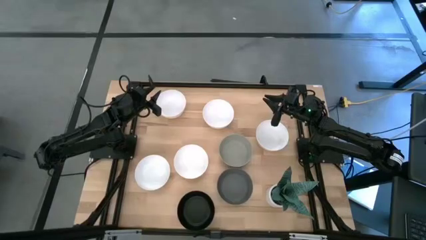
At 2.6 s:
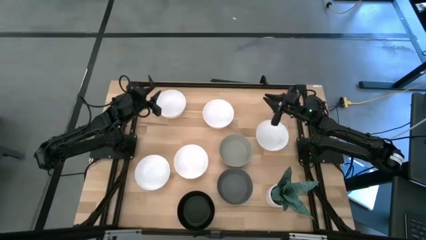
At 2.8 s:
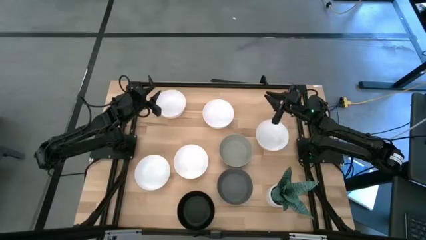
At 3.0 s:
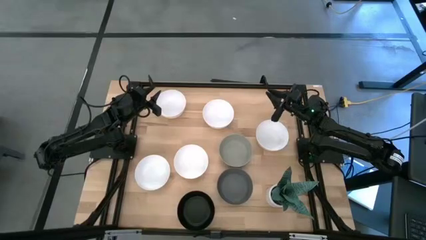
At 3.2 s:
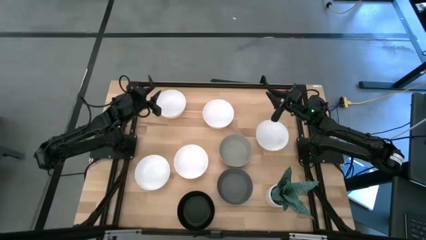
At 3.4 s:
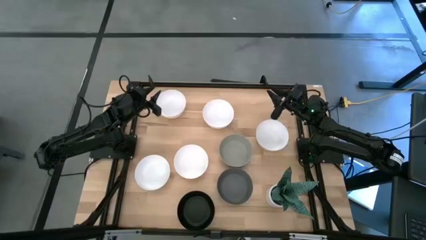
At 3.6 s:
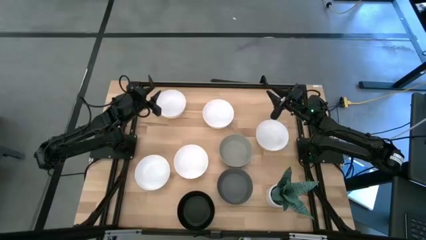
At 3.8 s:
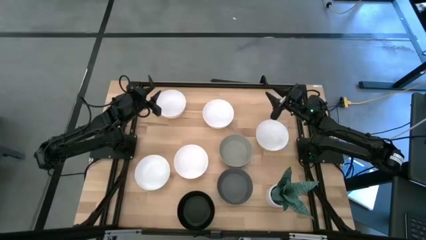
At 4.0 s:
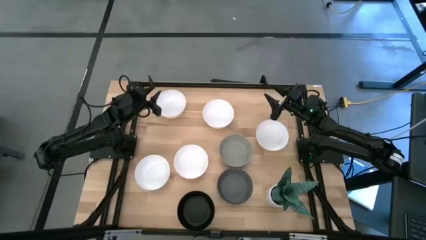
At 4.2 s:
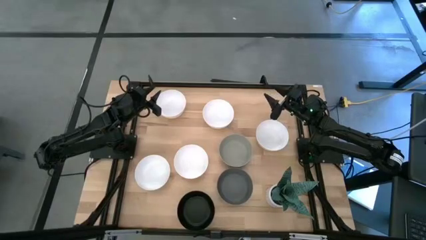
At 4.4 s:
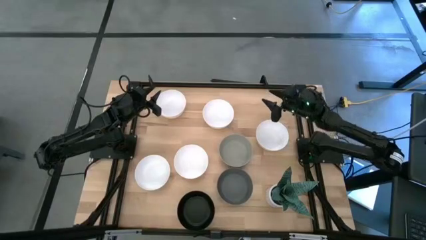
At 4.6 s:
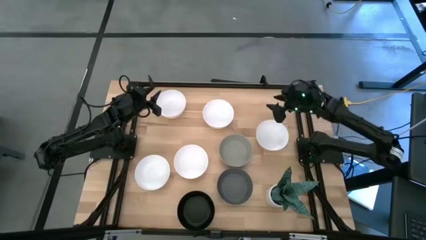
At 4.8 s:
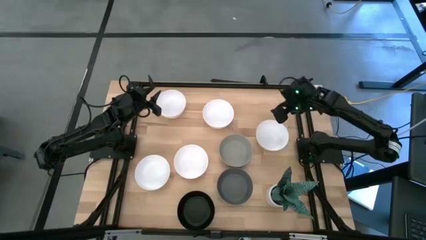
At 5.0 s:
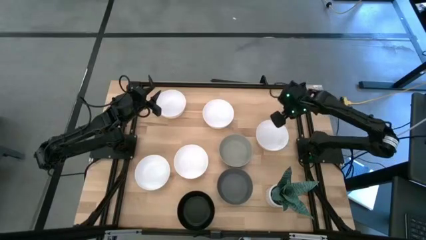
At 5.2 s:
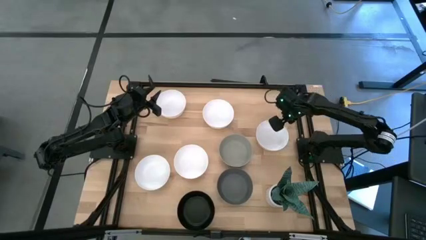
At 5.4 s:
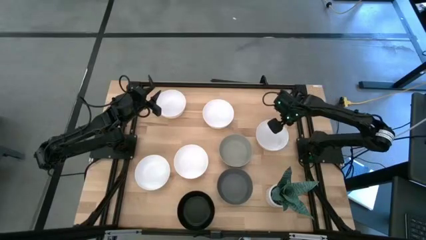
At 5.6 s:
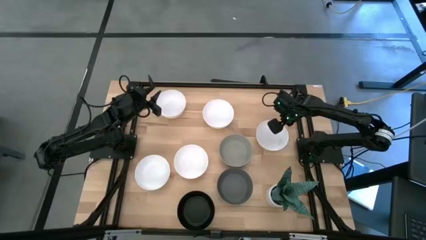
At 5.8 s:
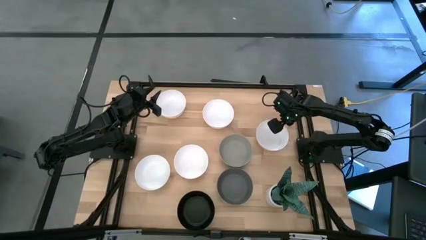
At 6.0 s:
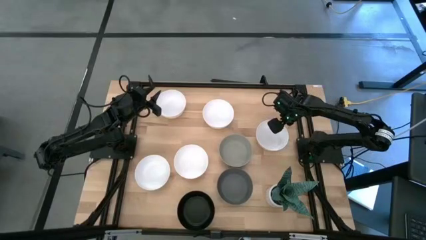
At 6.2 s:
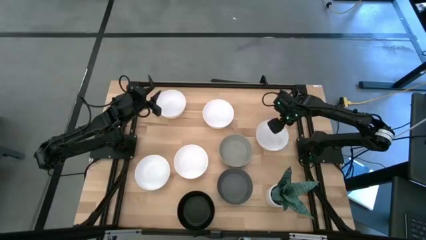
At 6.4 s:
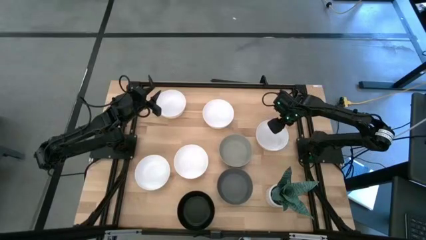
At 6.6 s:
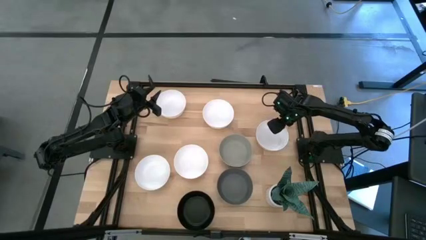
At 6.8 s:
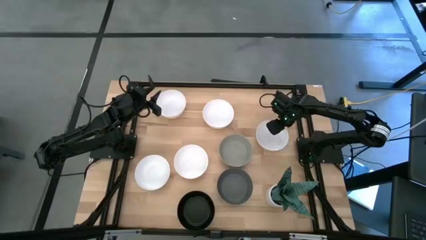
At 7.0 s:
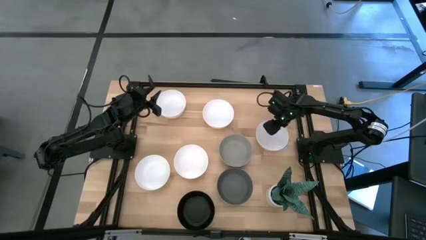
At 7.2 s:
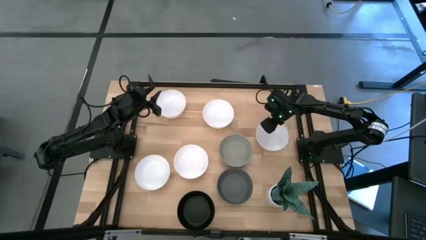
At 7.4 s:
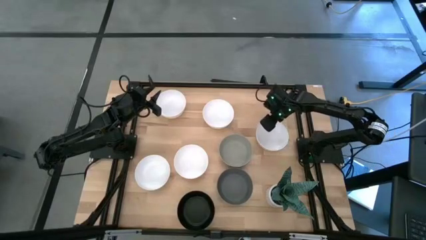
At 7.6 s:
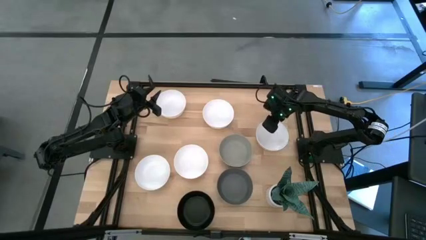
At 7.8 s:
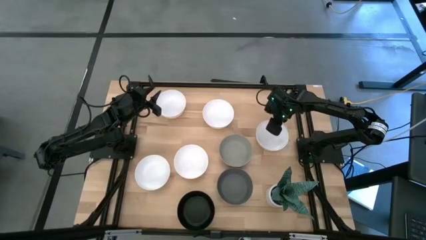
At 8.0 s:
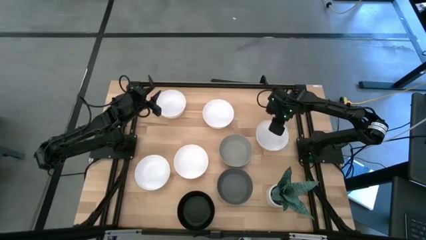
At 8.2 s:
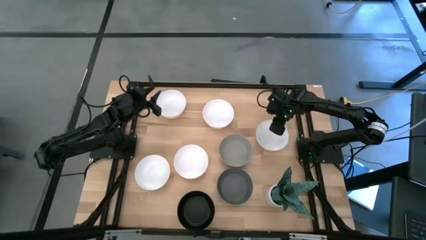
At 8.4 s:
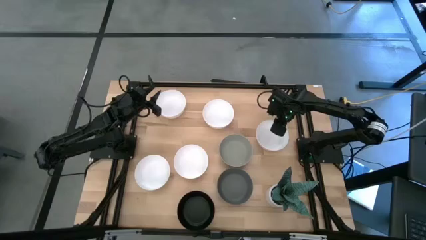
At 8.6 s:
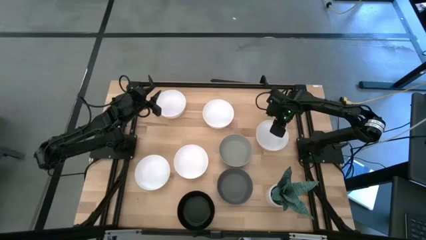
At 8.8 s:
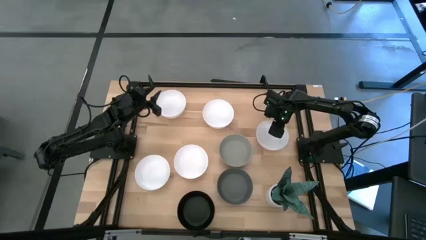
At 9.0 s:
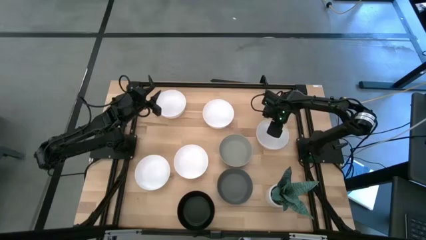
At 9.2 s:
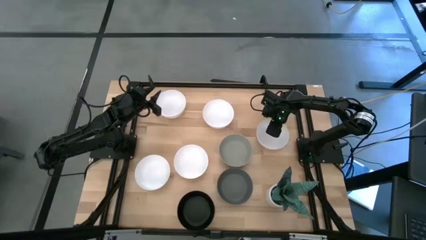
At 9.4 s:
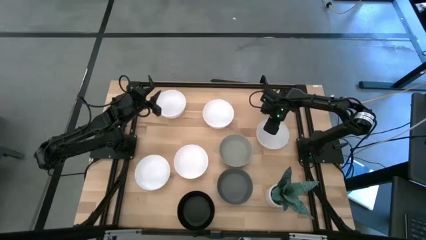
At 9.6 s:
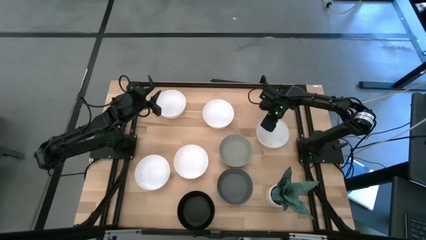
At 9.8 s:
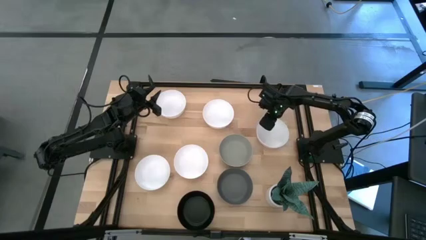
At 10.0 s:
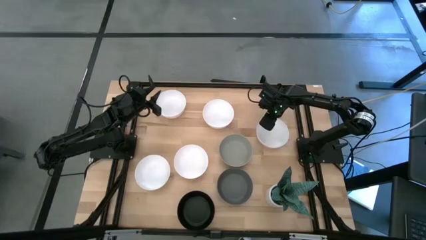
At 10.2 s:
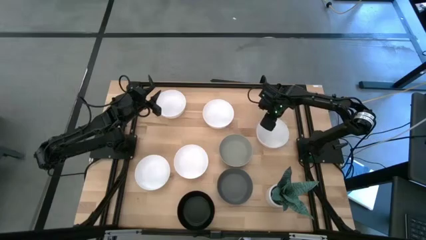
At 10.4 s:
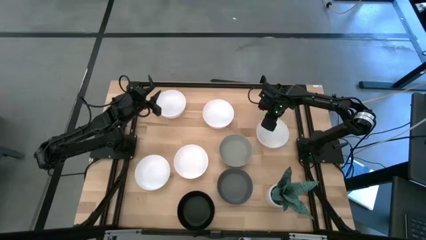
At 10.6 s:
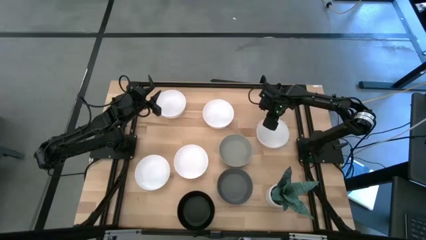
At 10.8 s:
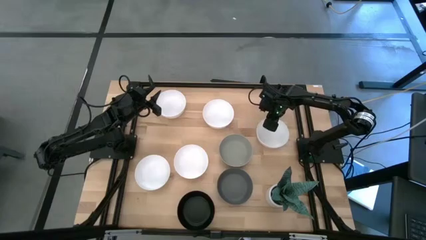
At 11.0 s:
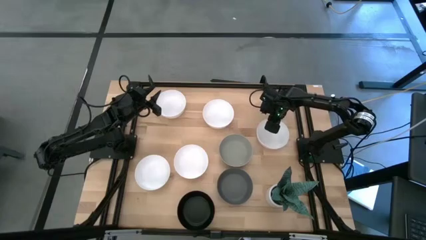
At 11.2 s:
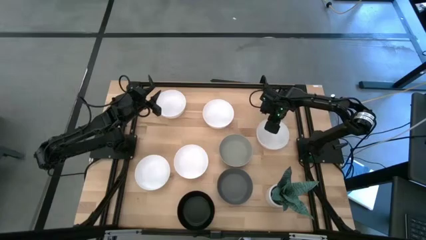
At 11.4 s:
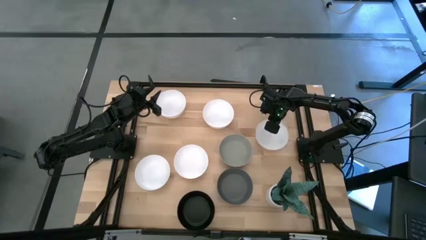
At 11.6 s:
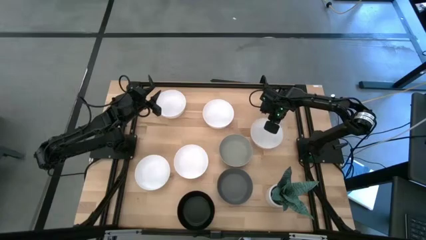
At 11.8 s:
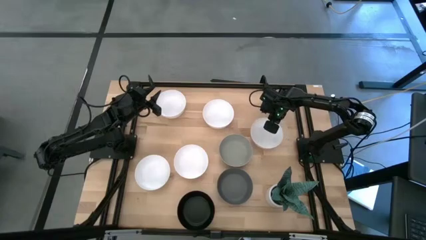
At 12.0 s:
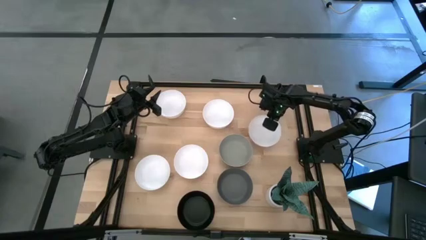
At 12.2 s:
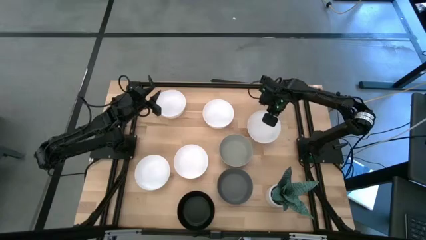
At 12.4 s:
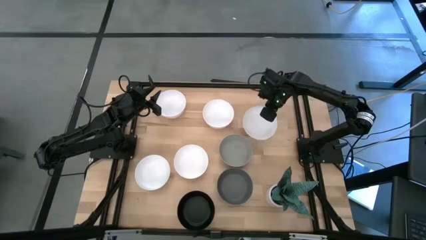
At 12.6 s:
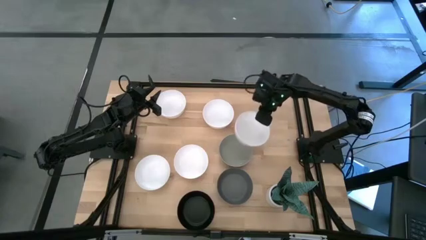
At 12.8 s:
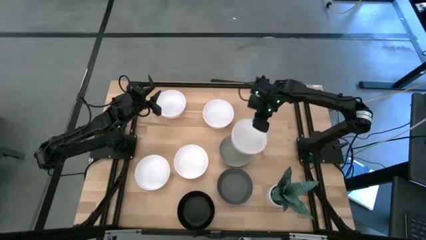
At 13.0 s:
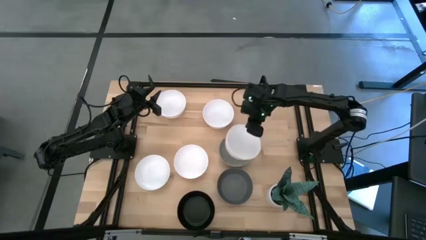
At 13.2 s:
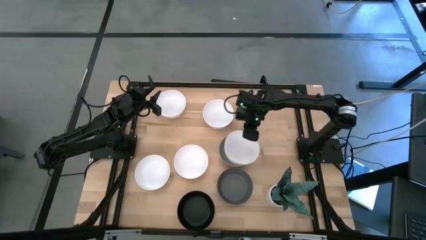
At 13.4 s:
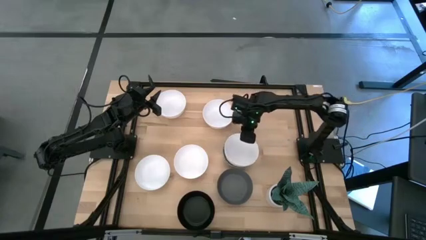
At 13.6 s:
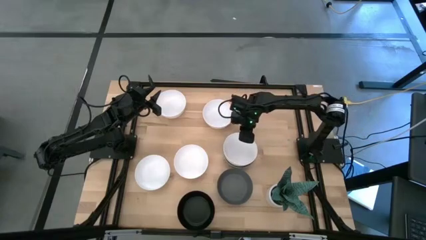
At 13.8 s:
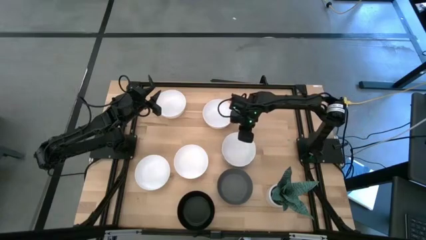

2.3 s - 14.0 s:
Task: Nest bowls inside each other
Stack the white bowl on the light gray bowl

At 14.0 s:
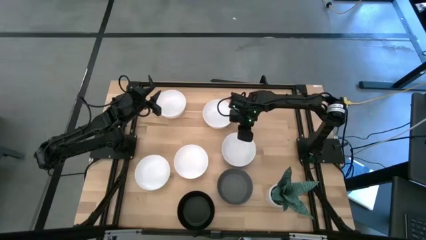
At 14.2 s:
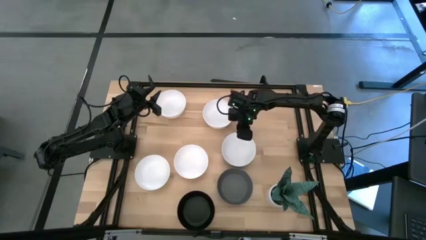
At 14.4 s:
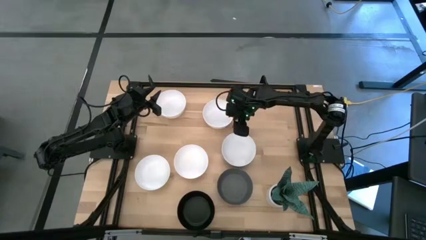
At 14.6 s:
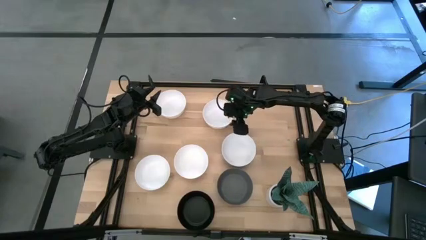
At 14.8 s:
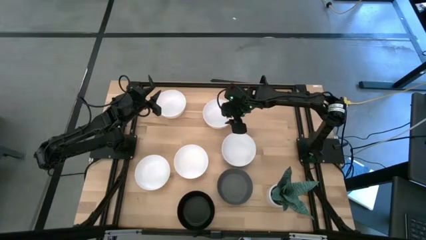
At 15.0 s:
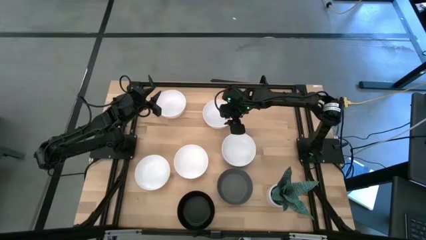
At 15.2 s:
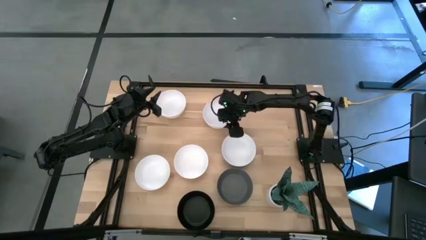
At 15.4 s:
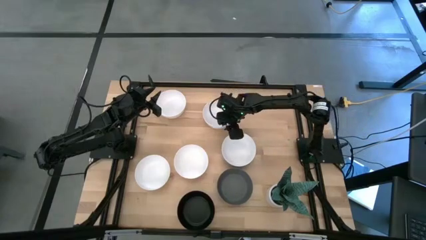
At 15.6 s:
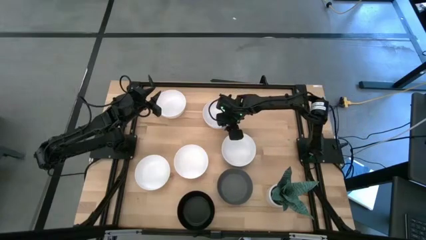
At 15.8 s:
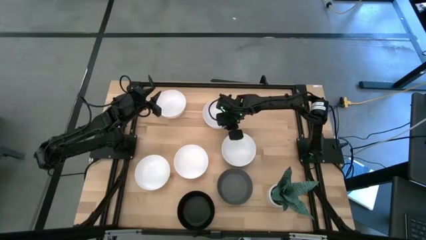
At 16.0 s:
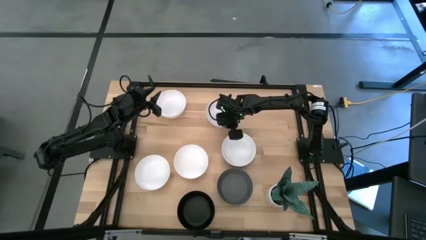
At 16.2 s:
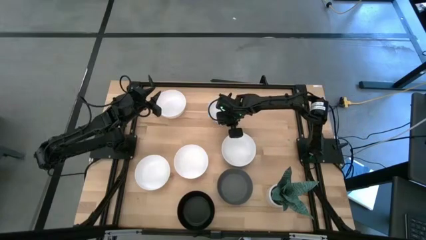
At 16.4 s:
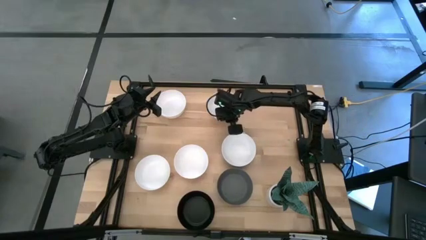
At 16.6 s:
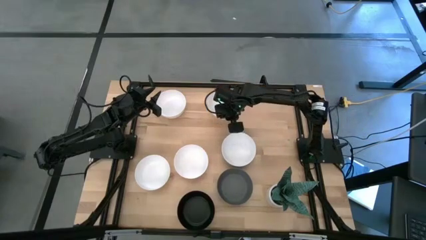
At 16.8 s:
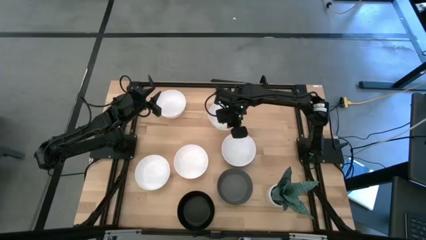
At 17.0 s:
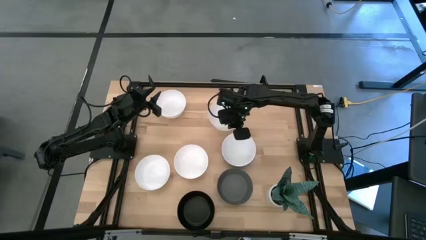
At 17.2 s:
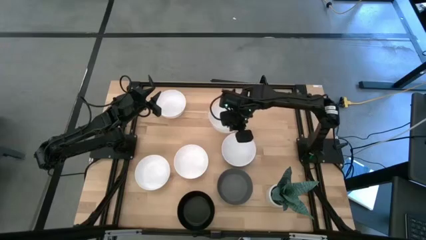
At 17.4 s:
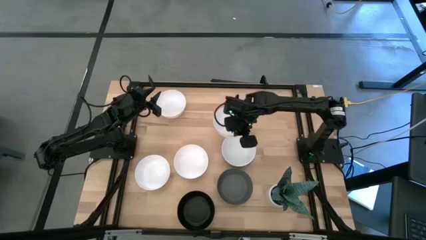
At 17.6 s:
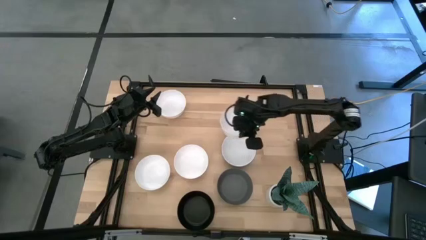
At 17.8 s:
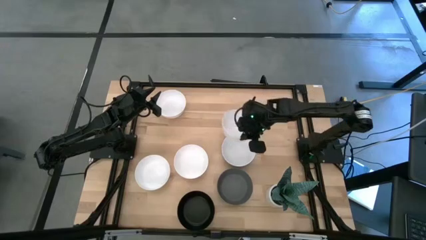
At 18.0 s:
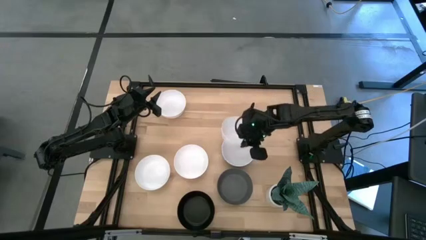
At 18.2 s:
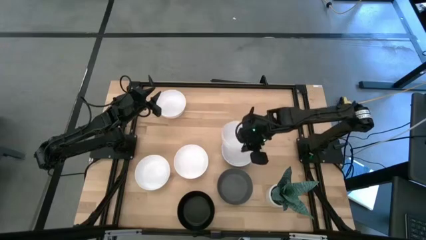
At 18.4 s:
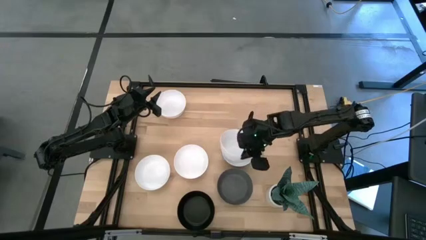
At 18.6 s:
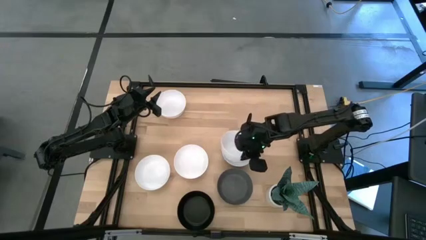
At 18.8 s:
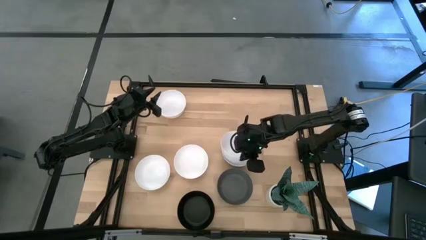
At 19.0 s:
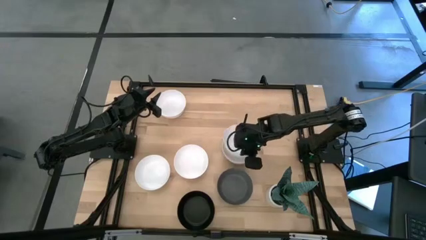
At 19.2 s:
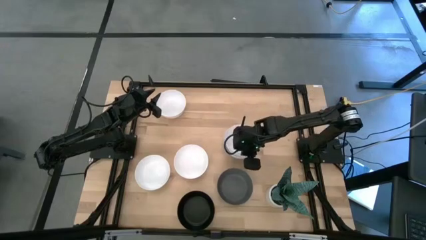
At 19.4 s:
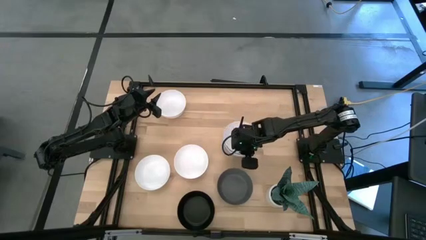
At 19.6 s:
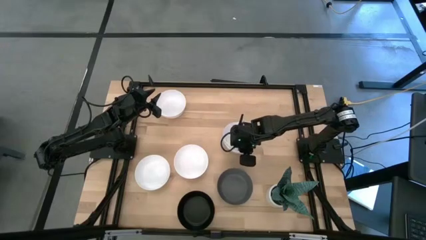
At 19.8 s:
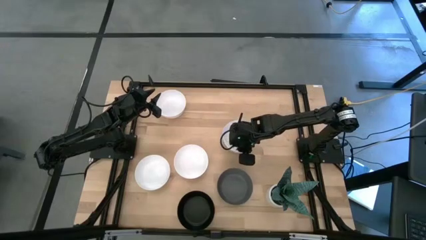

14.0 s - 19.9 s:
Stack the white bowl on the white bowl
